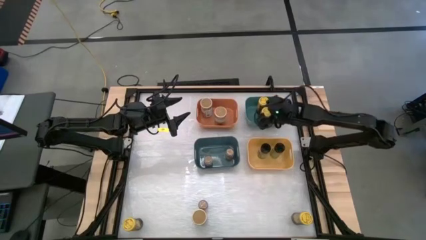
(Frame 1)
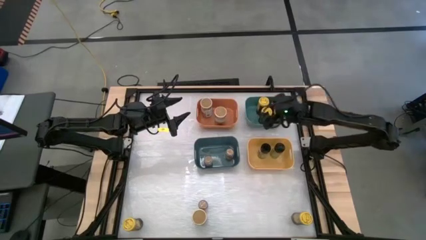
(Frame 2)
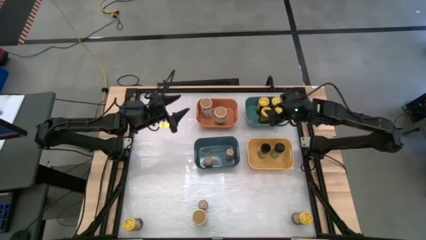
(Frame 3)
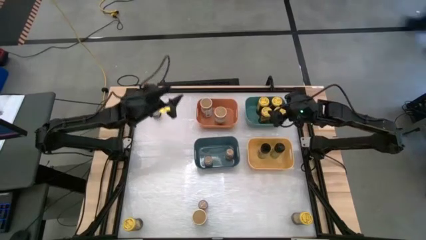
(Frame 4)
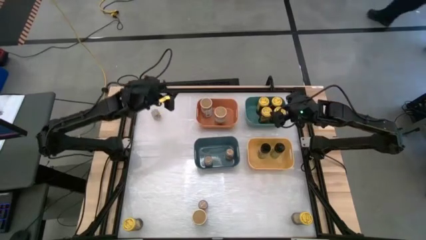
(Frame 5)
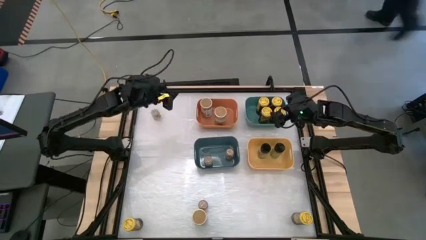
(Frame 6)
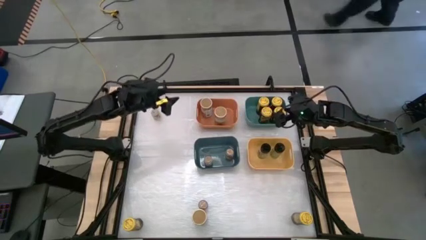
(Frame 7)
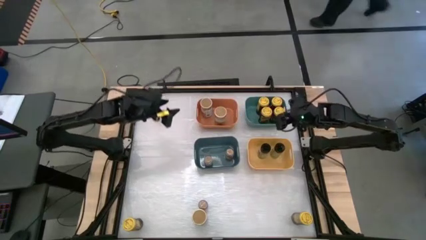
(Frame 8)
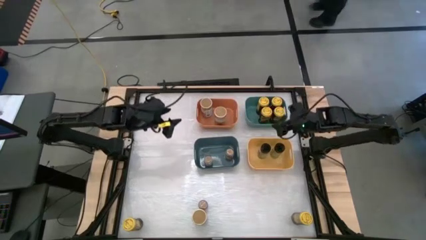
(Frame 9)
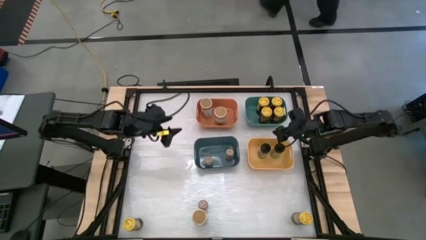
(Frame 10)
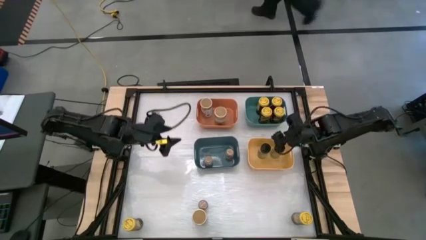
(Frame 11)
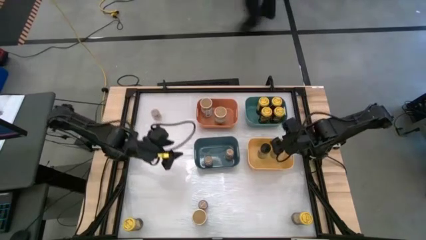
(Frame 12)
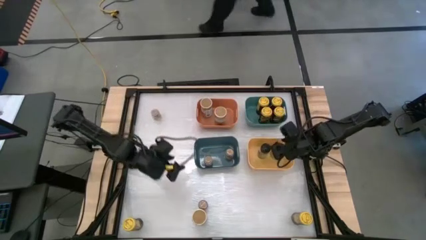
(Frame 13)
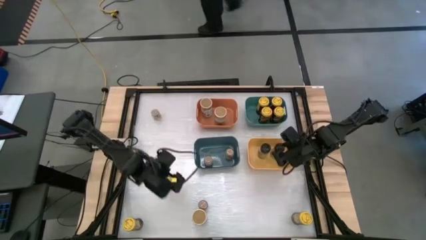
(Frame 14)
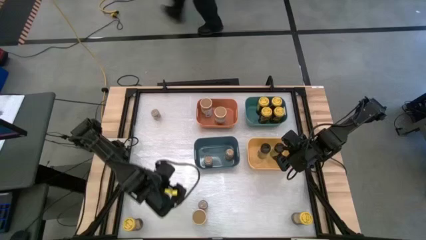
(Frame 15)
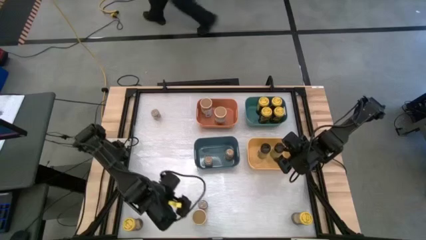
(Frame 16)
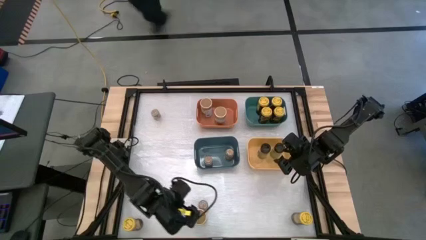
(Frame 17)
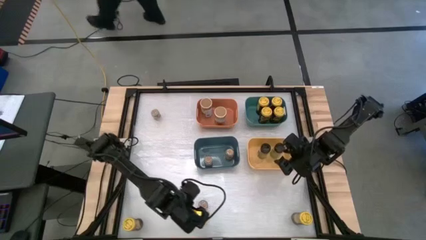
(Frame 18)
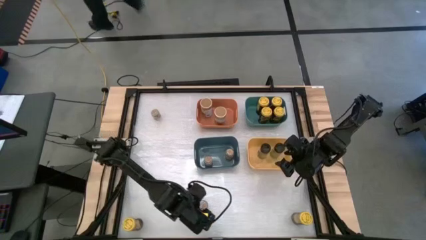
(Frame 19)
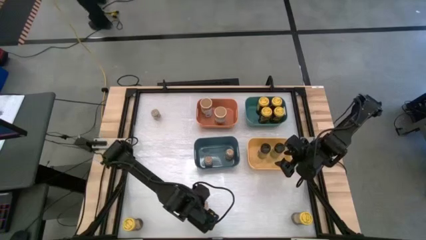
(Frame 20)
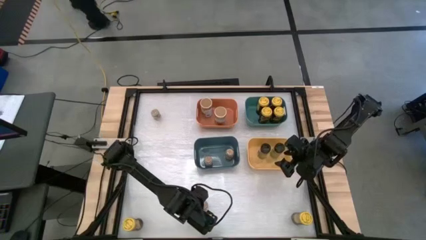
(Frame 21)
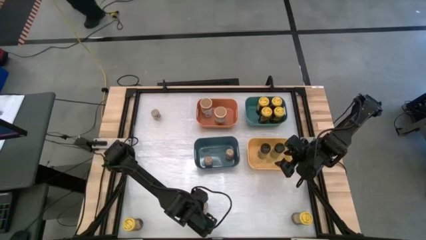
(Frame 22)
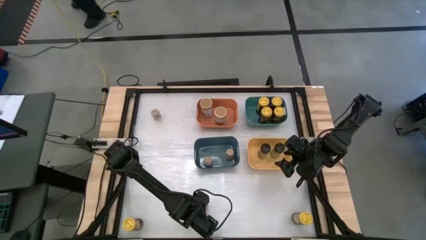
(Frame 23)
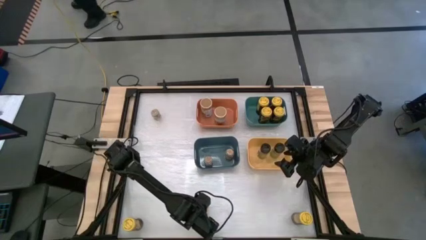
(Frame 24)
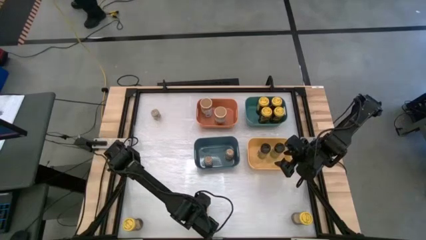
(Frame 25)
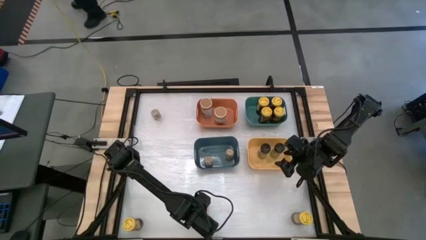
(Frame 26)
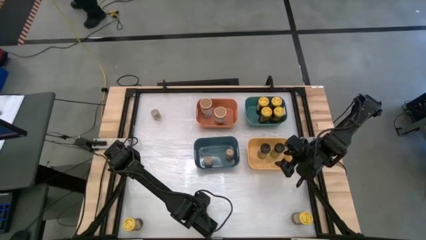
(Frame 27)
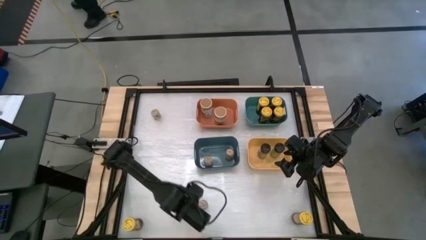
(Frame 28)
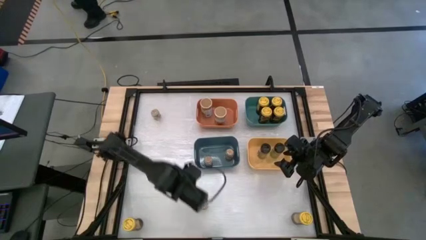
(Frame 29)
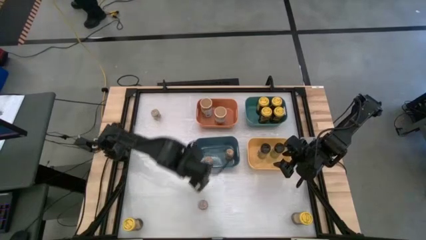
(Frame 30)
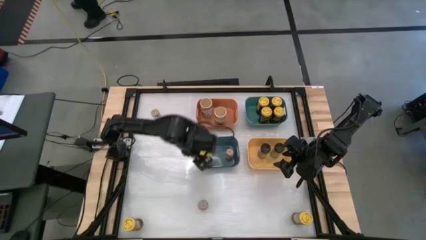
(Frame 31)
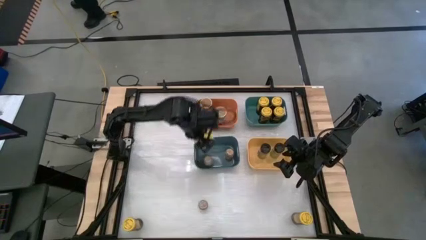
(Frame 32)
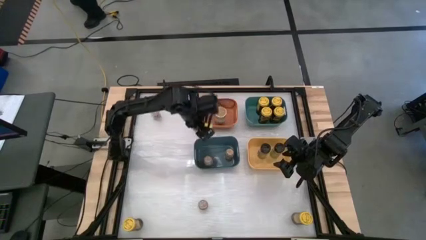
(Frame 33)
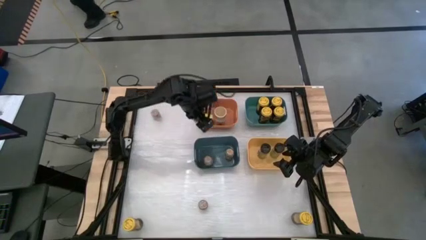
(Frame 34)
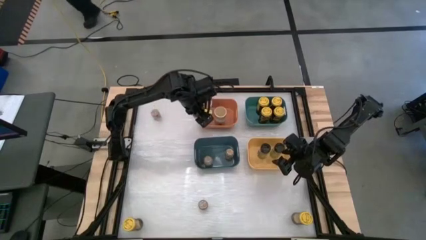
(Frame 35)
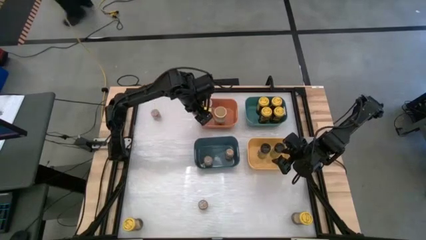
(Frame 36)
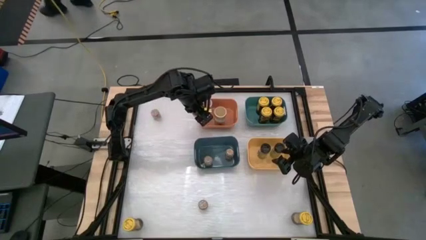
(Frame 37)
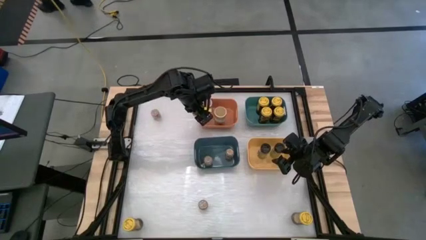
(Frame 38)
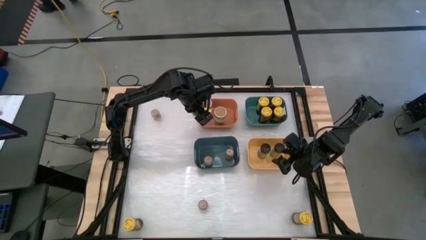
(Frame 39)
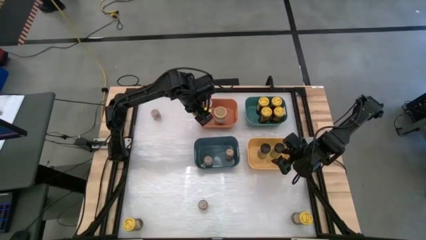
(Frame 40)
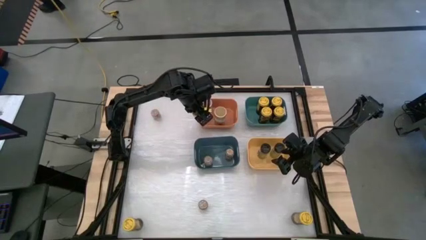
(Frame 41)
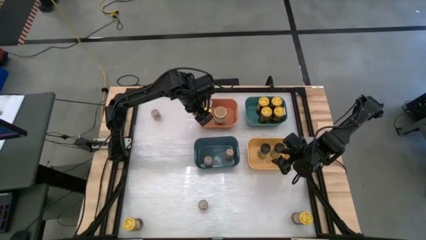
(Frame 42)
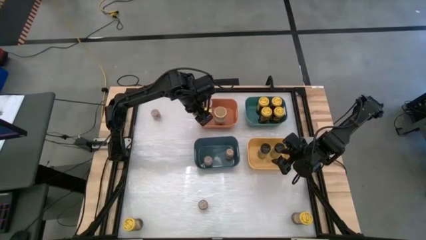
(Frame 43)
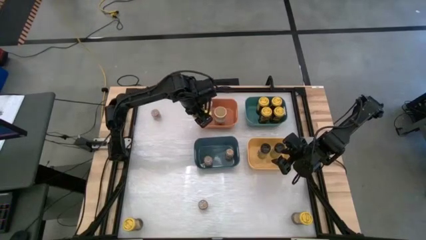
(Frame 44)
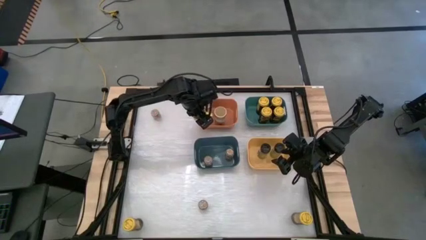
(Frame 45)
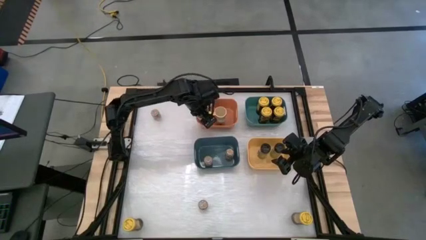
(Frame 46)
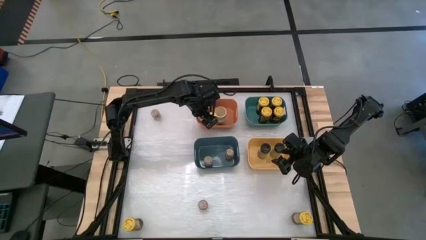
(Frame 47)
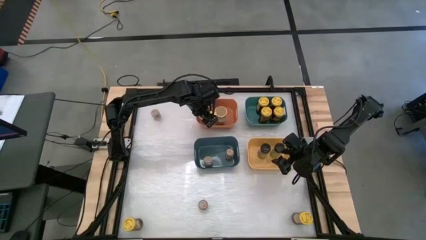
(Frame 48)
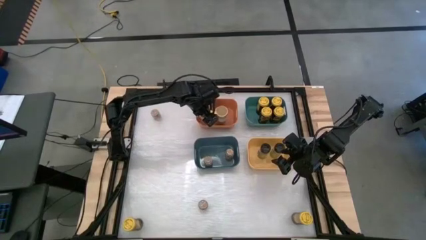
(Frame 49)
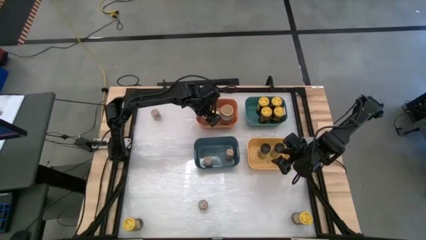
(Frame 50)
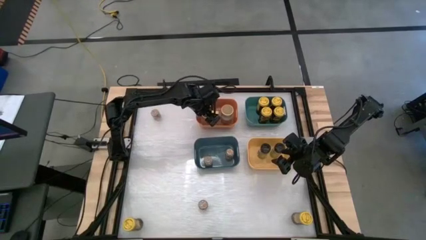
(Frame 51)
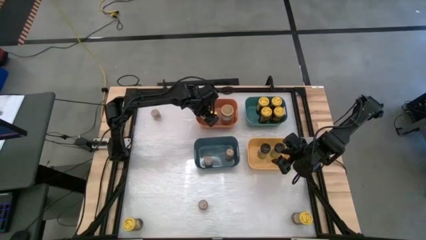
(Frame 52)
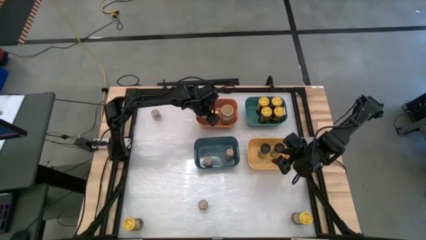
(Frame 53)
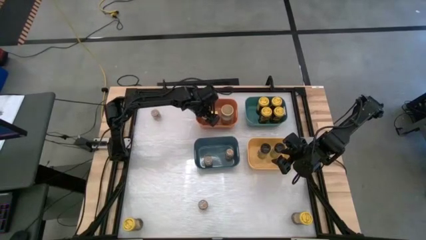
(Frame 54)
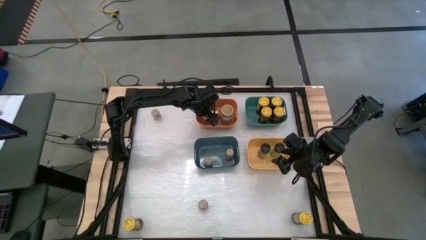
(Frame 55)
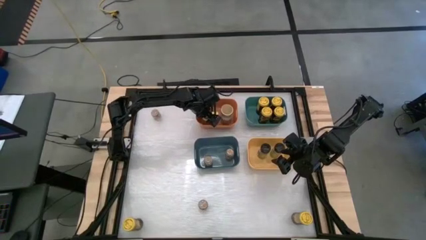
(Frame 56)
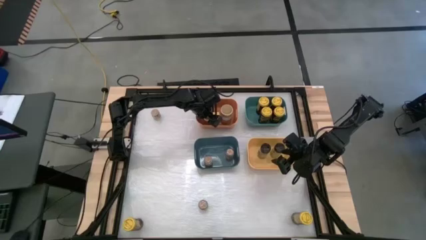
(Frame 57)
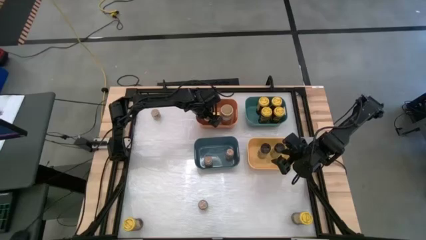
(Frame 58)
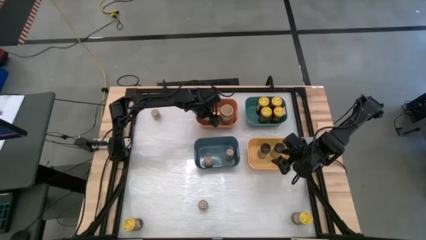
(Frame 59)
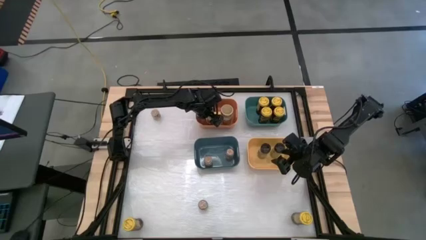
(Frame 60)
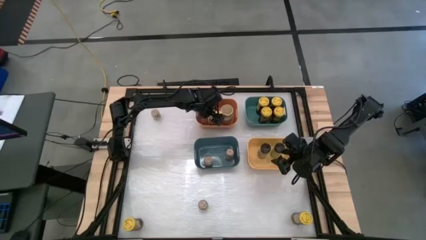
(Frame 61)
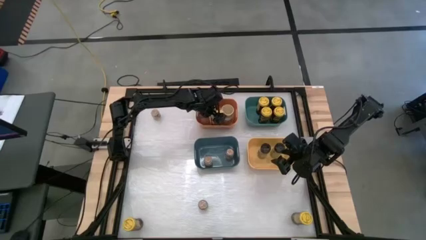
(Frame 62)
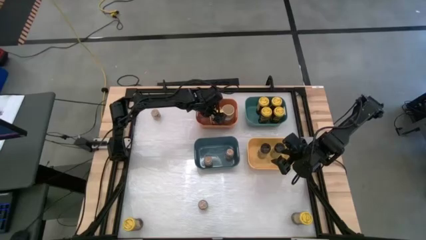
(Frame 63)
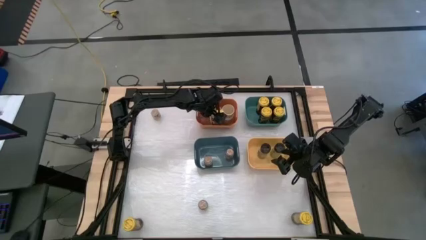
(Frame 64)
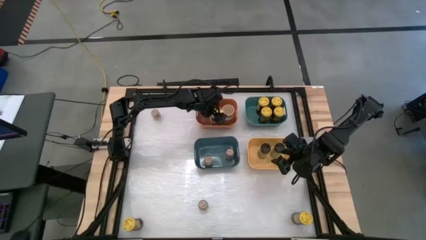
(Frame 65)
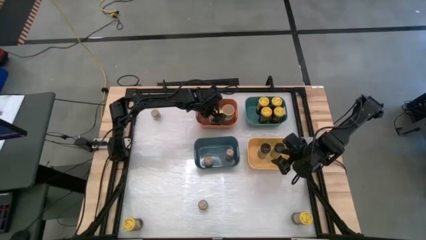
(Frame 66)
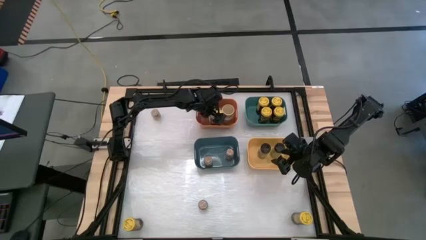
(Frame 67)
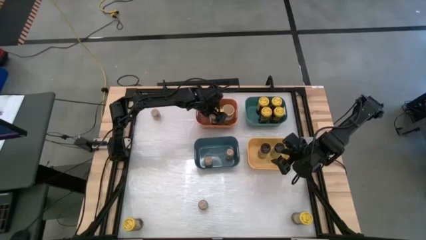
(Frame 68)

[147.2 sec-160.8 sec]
Task: Sort spices by type
Put the gold spice bottle into the orange bin
